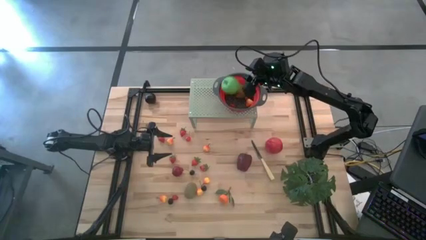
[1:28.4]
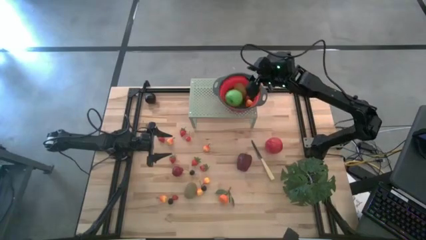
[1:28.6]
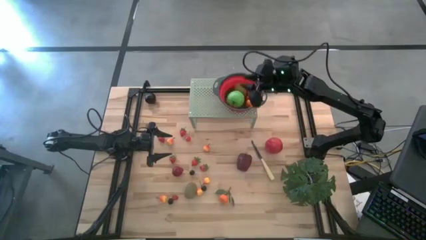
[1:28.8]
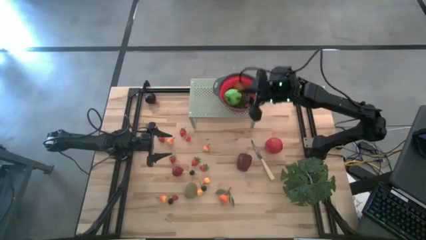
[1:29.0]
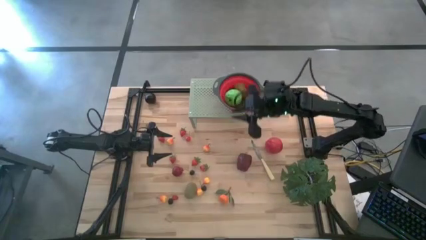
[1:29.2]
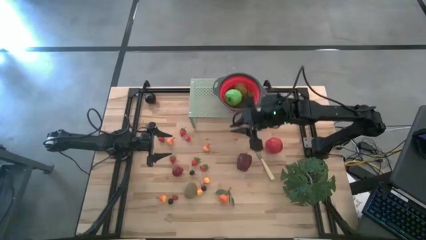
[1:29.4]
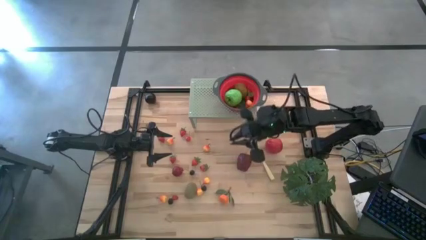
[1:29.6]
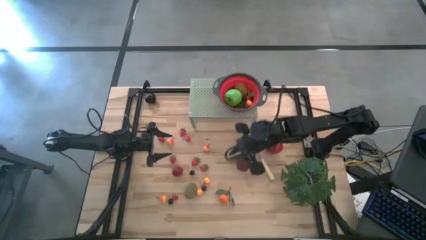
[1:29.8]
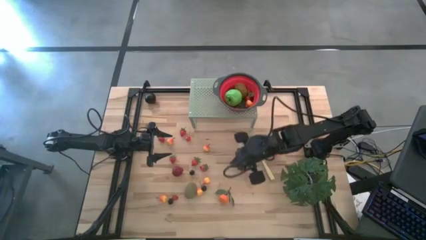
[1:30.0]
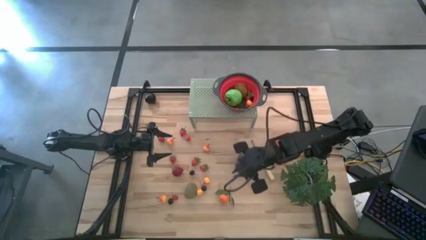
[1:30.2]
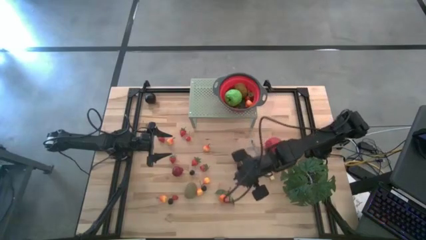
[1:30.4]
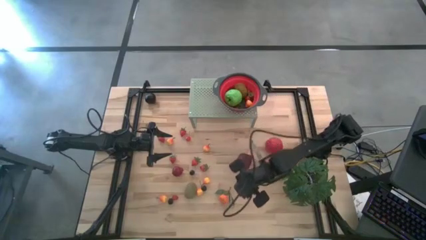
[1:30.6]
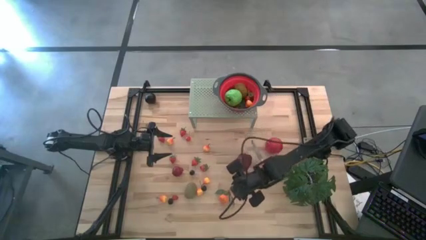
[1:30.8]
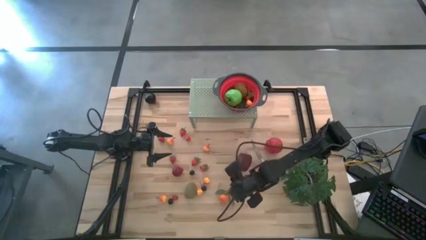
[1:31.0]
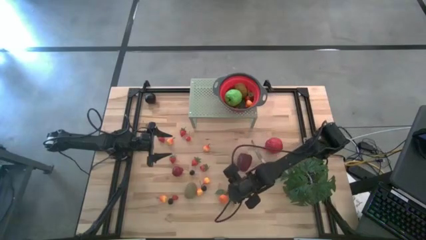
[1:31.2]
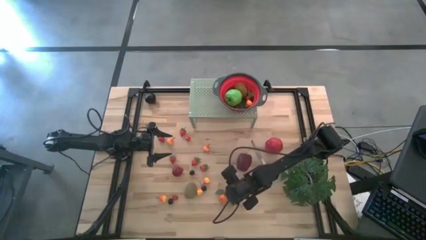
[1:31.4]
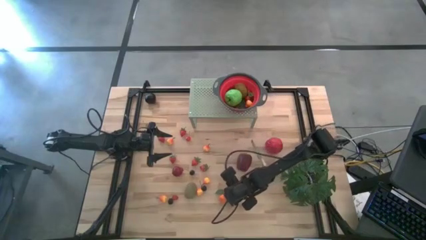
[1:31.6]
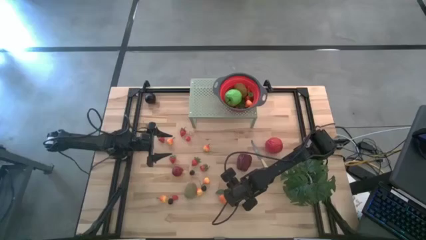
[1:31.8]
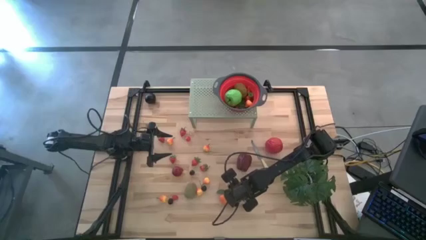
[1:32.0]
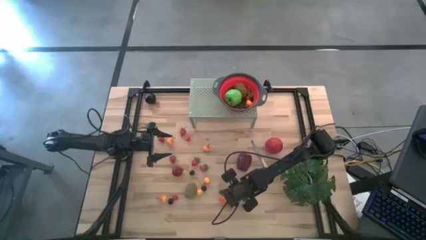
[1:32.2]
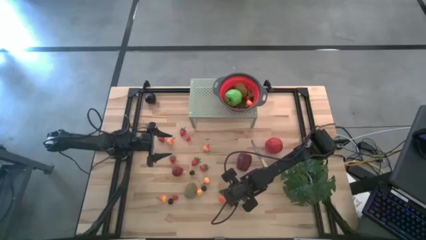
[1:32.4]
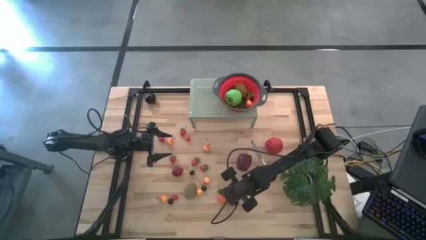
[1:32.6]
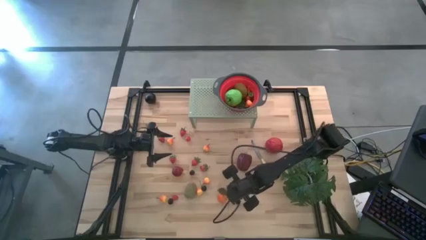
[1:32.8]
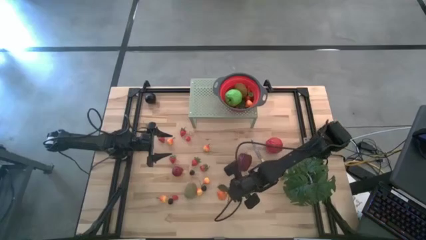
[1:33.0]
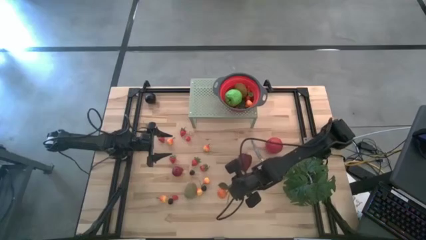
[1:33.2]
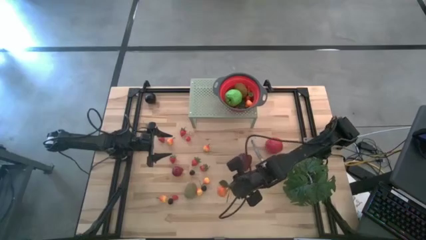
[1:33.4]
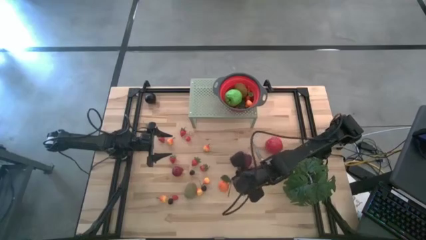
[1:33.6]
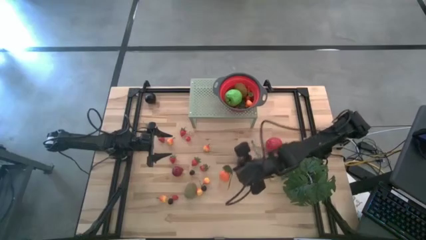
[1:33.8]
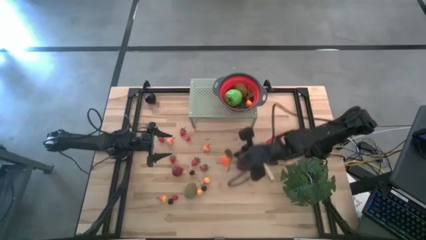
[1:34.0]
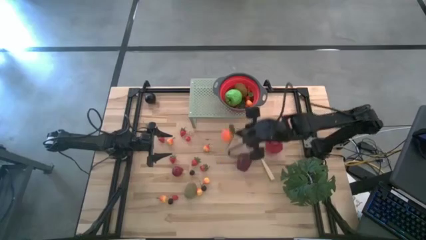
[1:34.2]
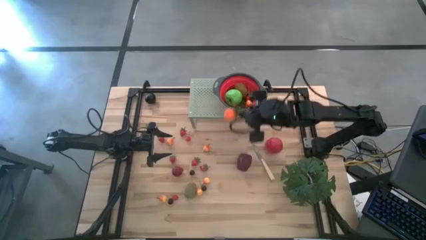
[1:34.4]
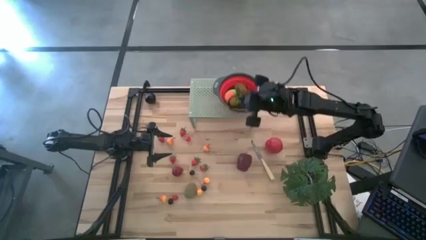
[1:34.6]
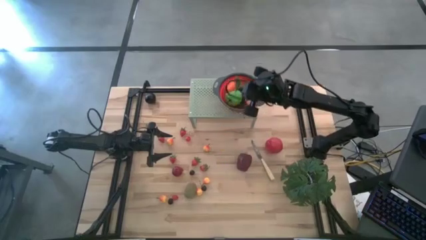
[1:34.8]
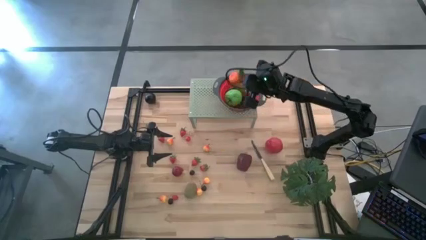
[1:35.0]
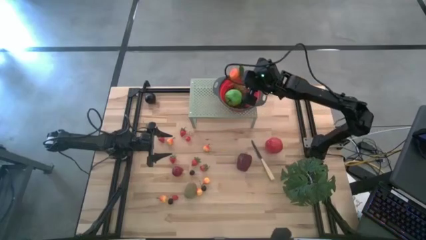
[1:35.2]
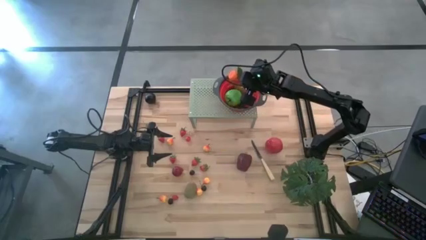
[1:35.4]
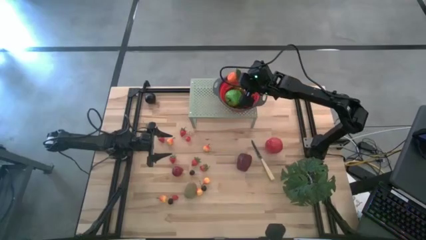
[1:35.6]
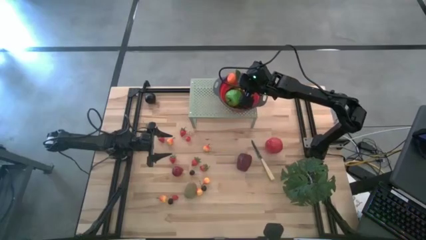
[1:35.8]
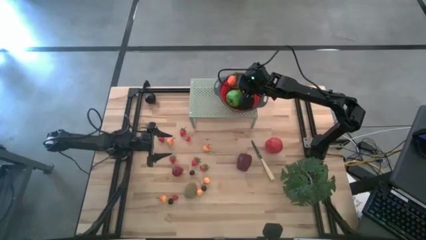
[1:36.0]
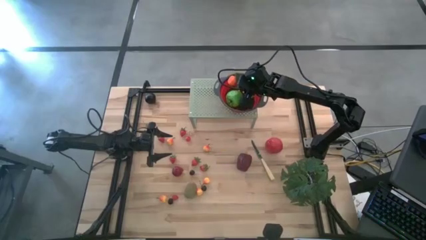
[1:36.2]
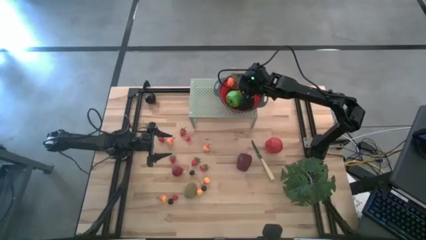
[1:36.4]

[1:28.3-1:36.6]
Task: Pick & Place Fruit
Put the orange tangerine into the black strainer bowl on the shelf

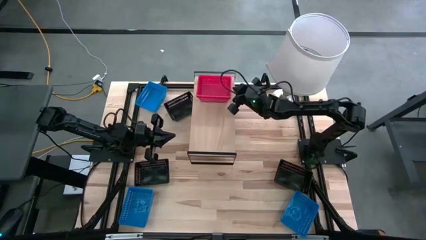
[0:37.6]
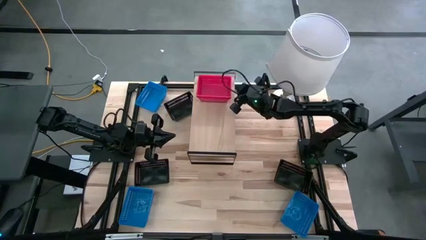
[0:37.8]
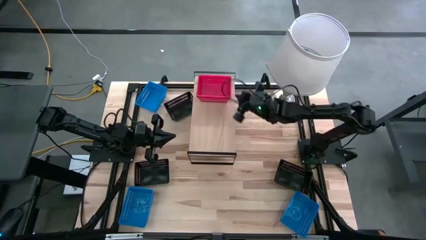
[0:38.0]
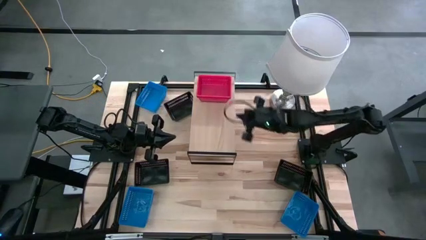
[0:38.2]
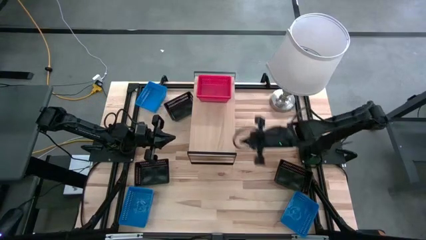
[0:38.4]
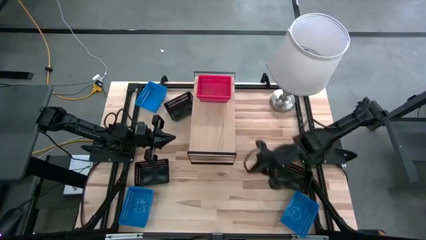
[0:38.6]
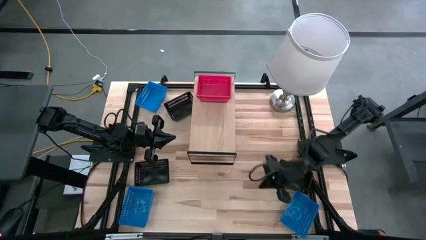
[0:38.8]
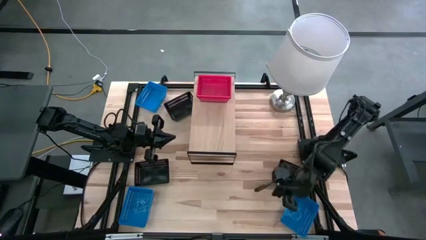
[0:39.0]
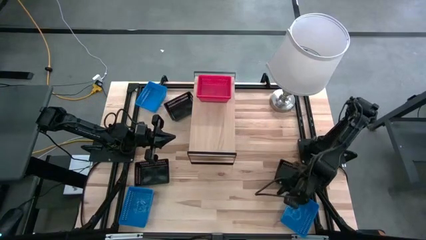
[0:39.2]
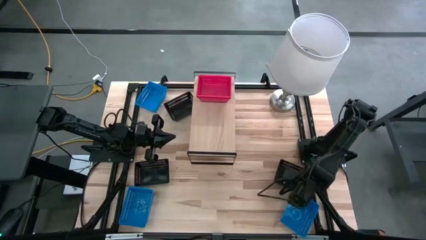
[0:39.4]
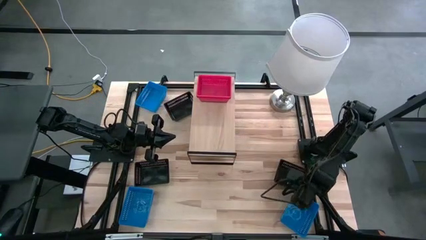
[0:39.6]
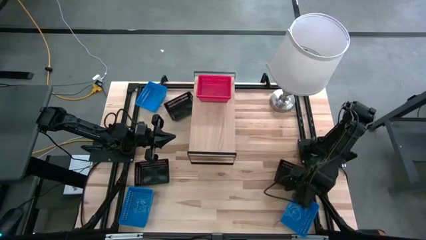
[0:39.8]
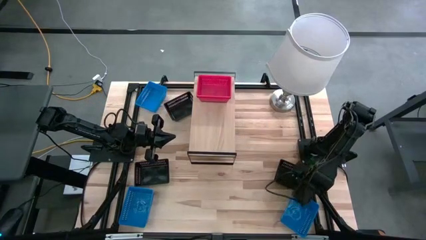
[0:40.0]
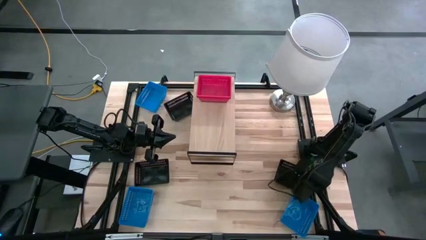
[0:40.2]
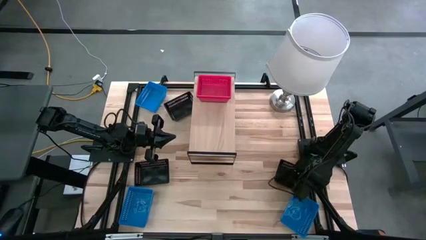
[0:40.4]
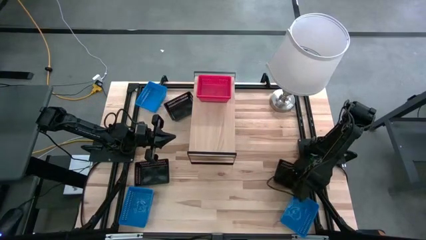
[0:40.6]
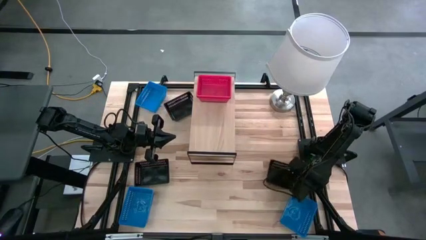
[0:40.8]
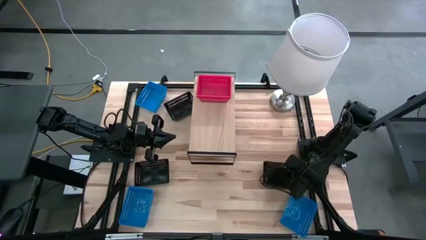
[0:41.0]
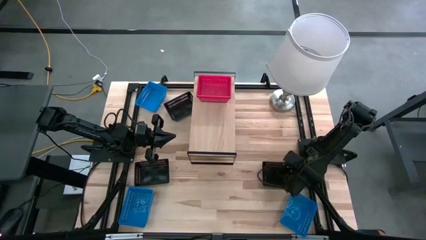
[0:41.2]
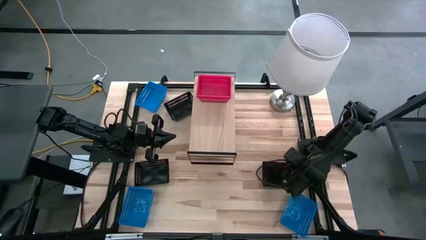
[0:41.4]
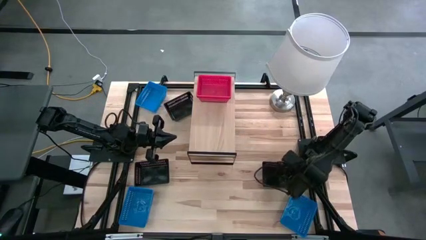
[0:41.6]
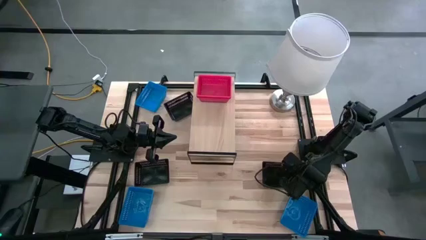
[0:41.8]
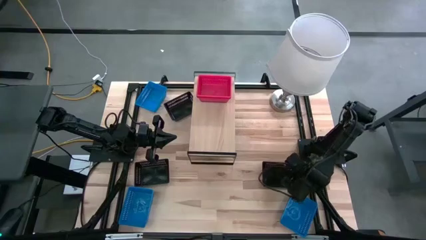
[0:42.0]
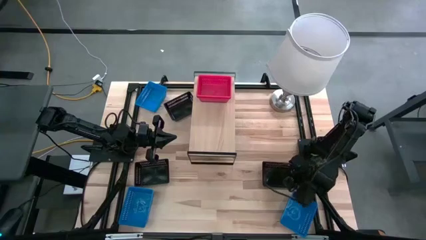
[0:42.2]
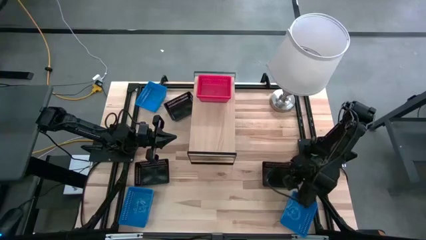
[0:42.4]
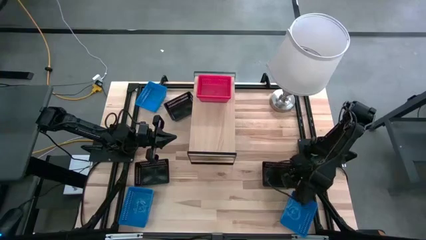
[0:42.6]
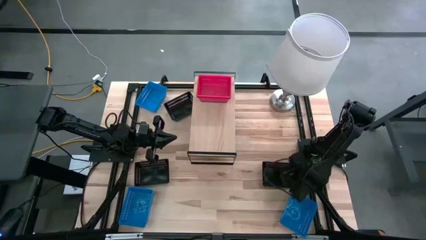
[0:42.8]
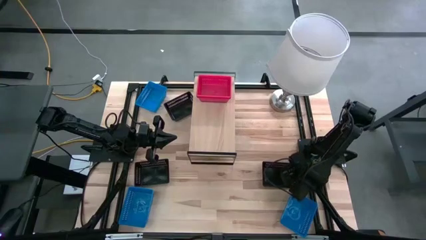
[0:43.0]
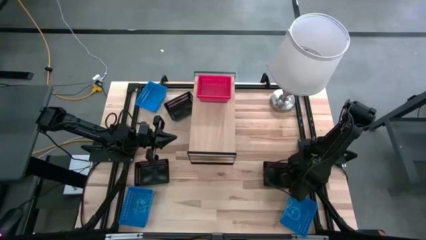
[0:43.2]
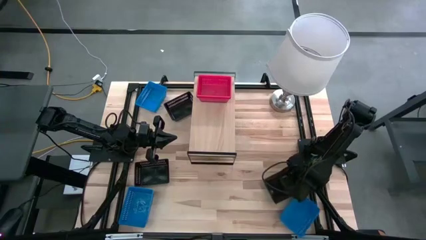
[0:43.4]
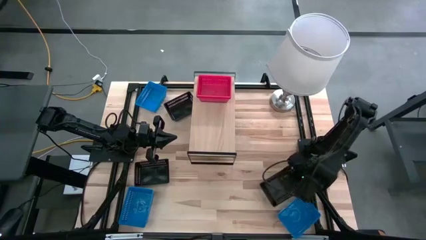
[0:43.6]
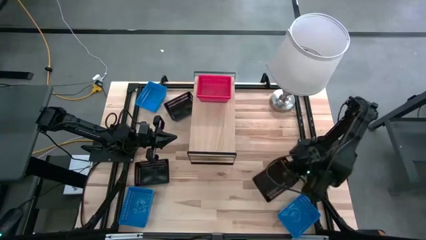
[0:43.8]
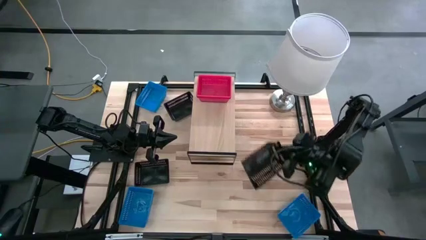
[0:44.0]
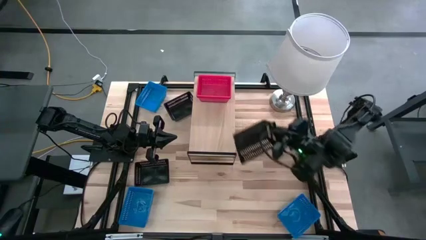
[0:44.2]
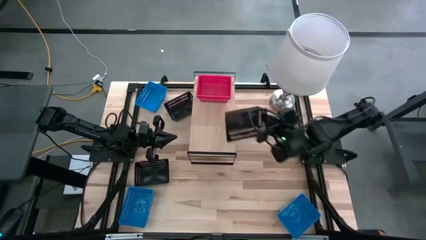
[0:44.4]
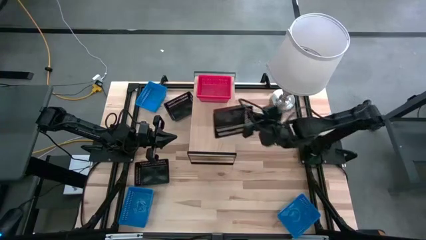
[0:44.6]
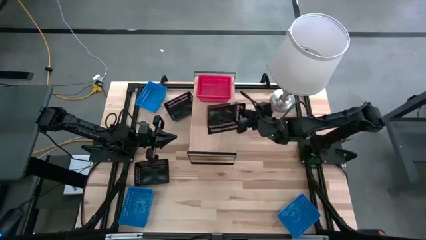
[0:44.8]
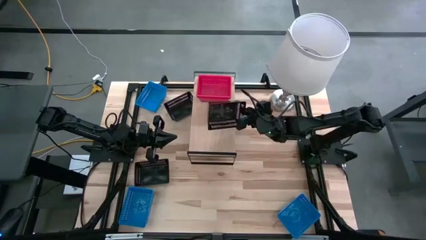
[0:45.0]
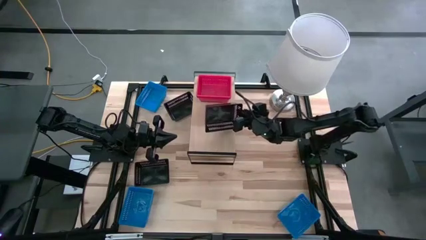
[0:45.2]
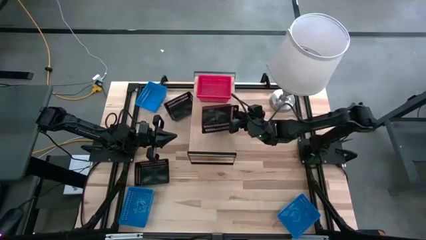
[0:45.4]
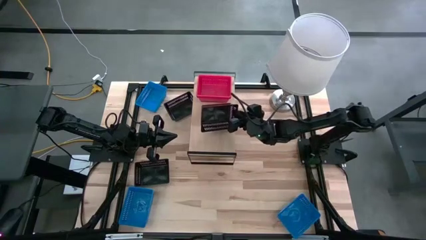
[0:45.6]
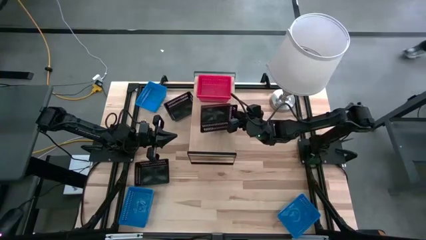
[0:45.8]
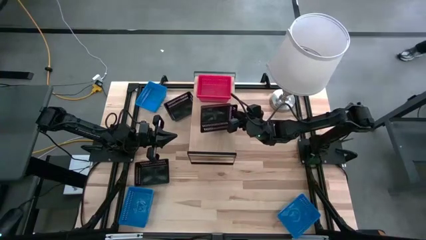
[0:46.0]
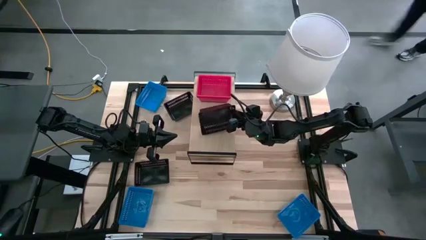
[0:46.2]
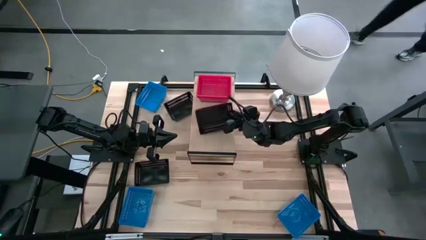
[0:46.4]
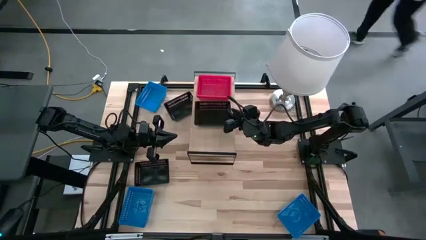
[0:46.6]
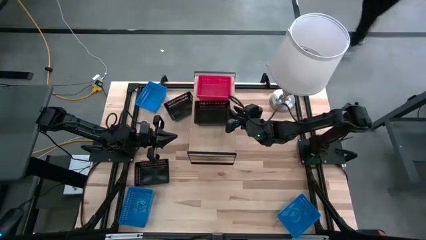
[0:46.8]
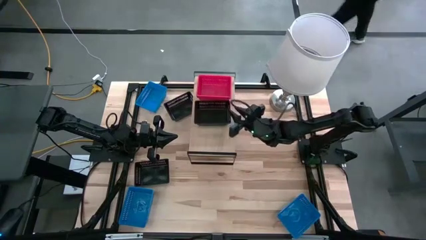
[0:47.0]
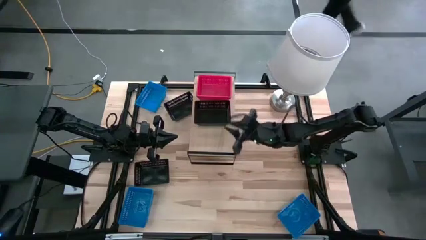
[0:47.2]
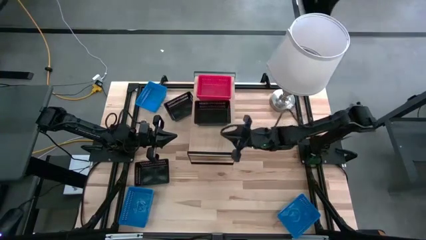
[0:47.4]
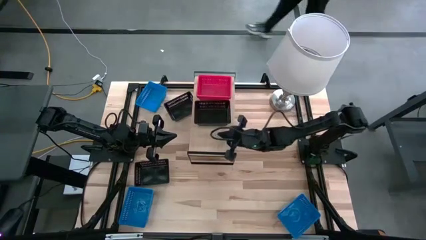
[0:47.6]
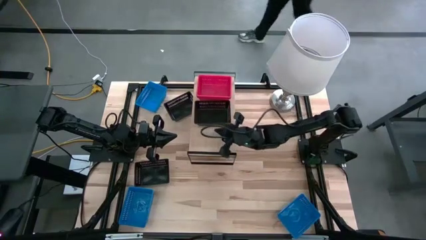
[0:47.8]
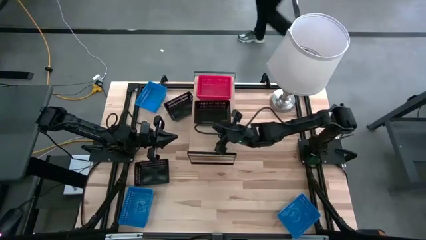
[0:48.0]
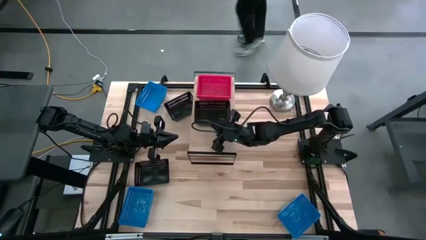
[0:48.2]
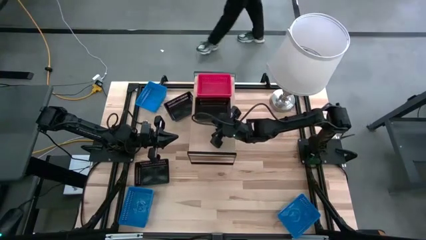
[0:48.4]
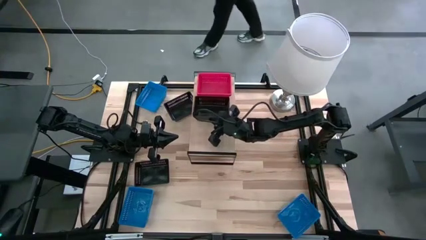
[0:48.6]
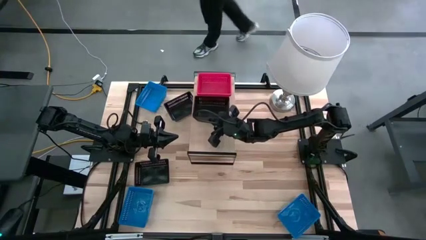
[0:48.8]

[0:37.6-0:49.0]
Task: Stack baskets on shelf by color
Put the bottom right black bin on the shelf
